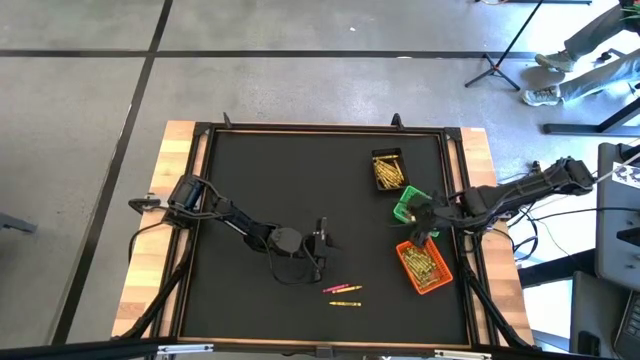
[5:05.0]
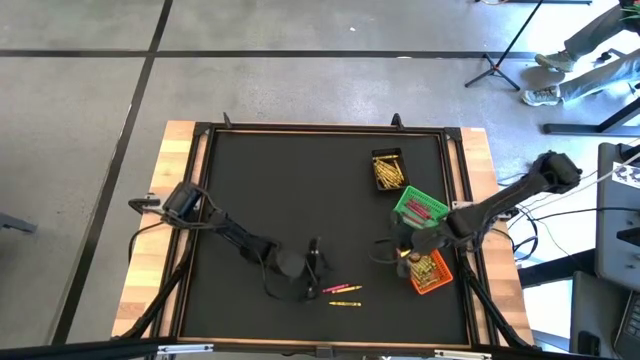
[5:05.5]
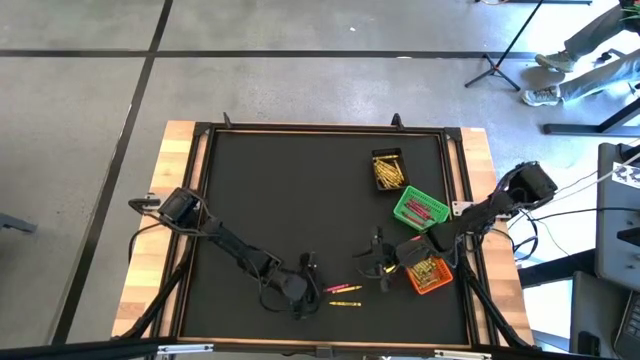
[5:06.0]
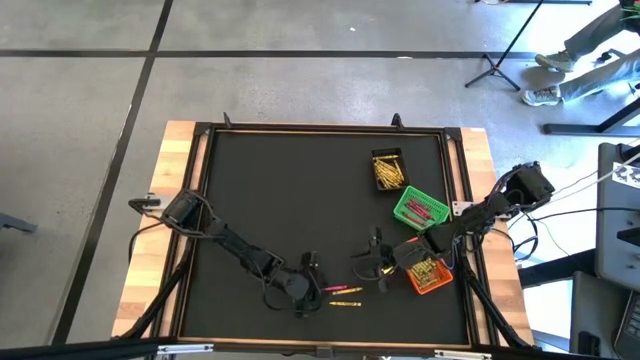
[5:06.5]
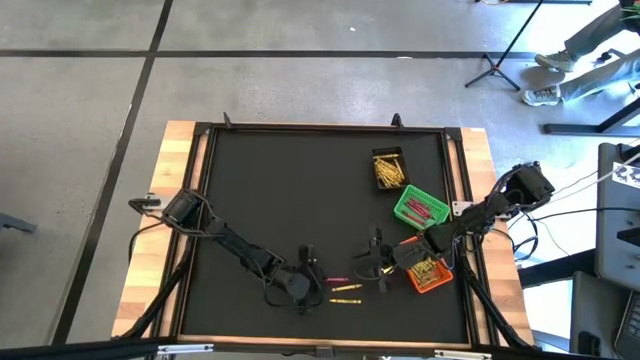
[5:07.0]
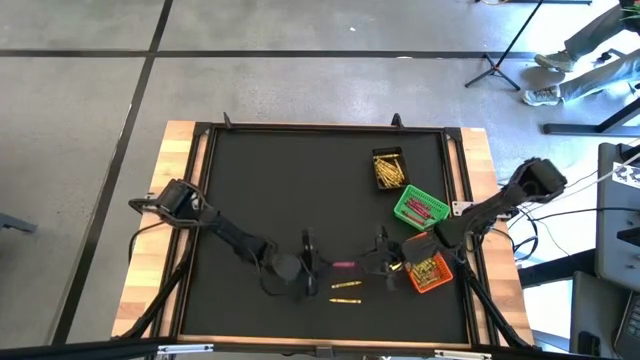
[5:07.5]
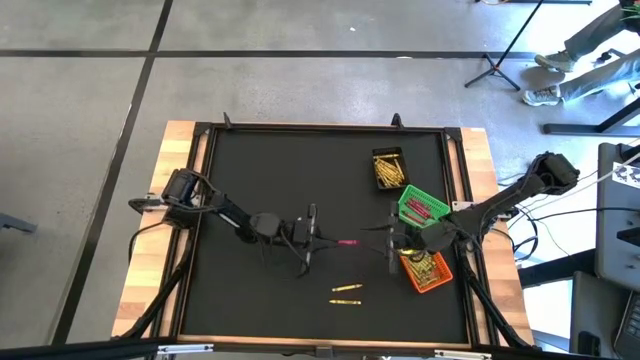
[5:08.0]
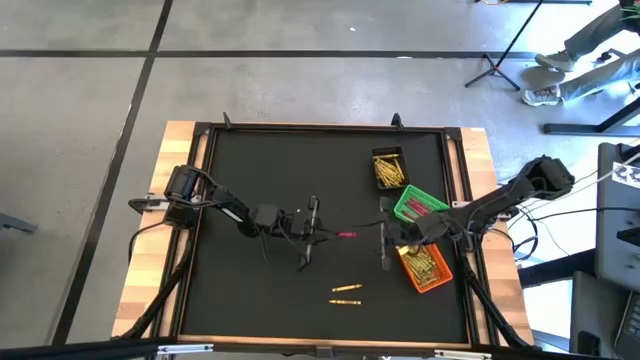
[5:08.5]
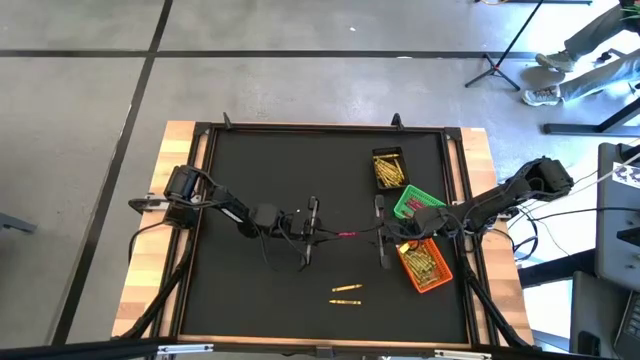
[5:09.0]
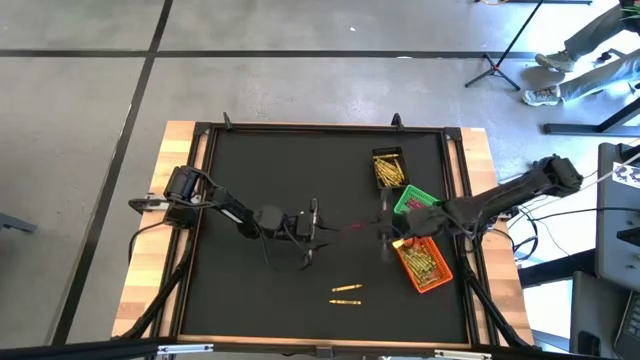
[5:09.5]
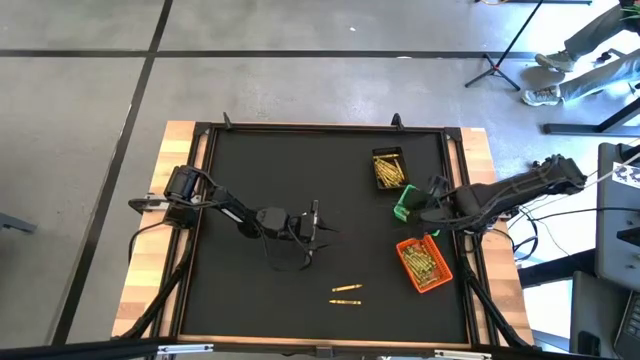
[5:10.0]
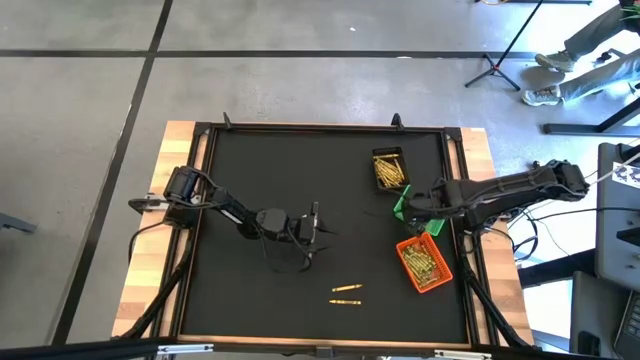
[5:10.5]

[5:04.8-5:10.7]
Task: Sort crayons
Put the red crayon into the green basket

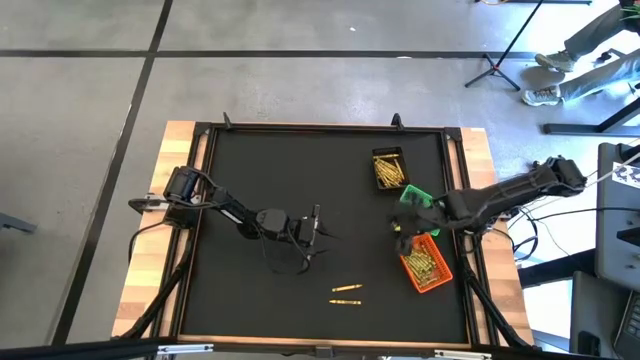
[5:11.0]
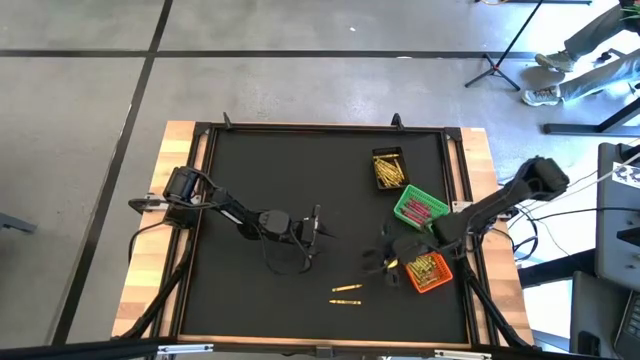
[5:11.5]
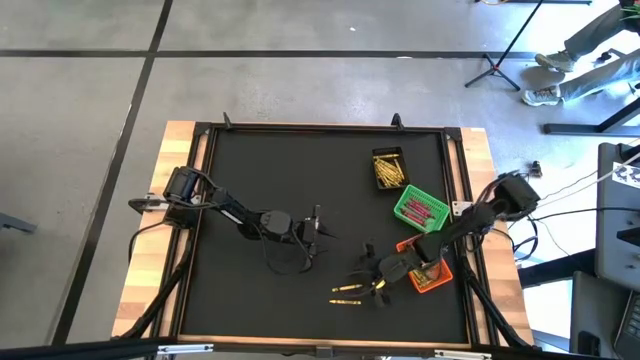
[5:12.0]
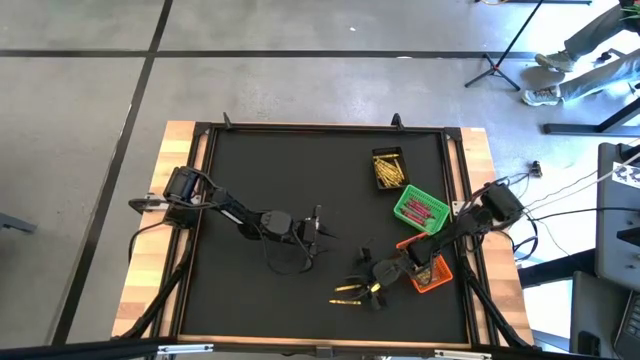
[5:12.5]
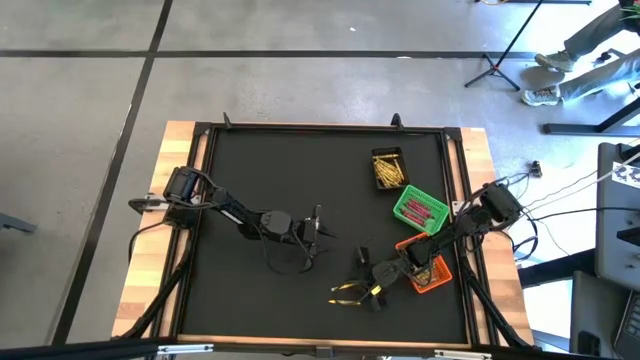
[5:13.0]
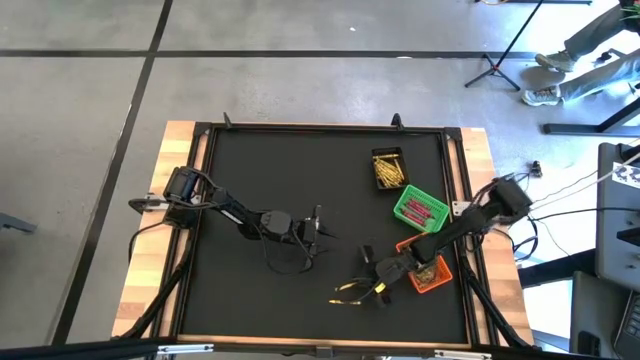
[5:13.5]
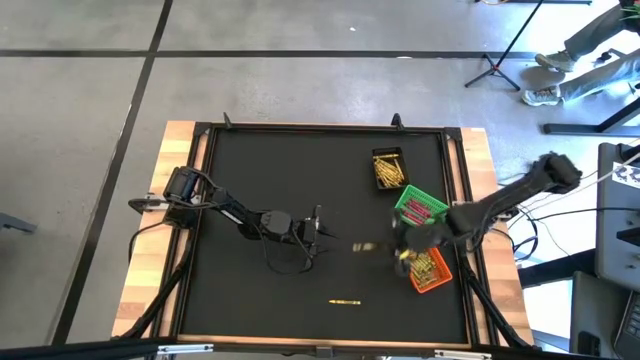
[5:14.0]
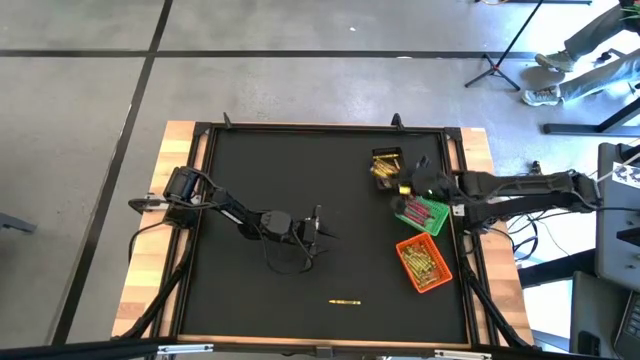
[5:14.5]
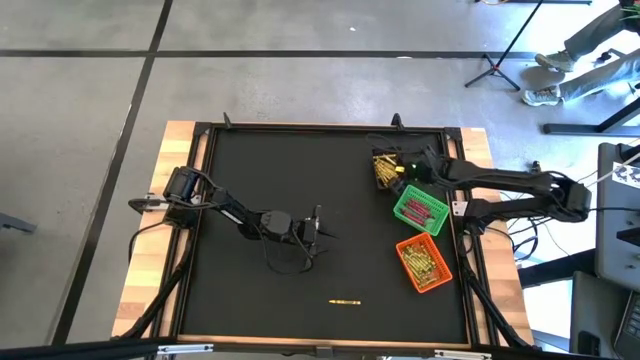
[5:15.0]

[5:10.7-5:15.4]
Put the yellow crayon into the black basket

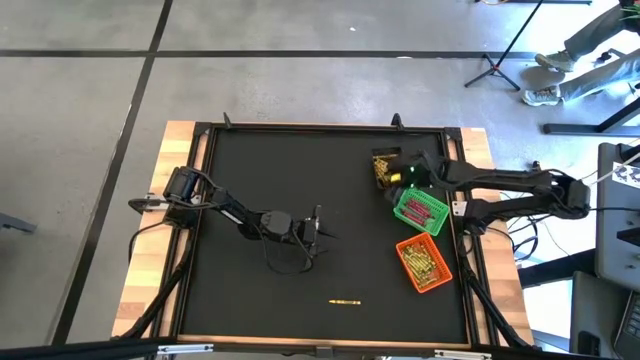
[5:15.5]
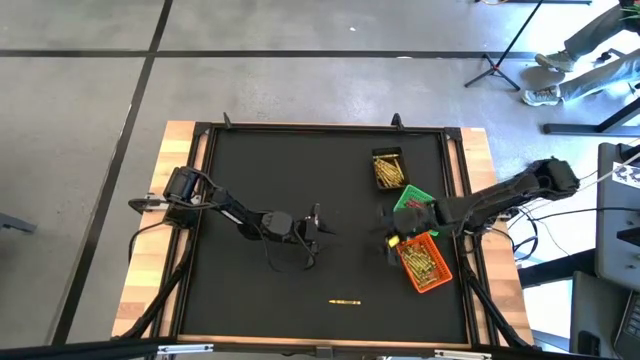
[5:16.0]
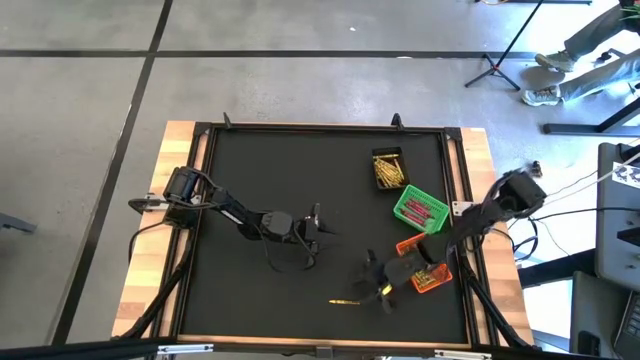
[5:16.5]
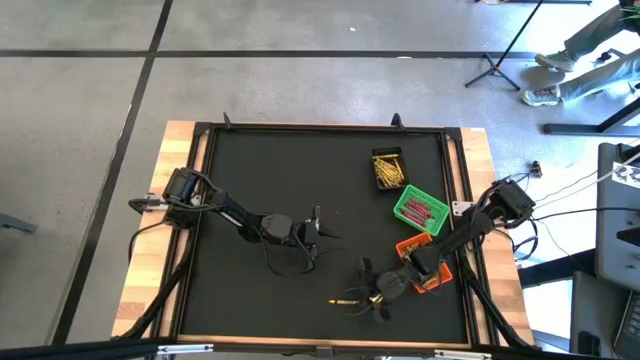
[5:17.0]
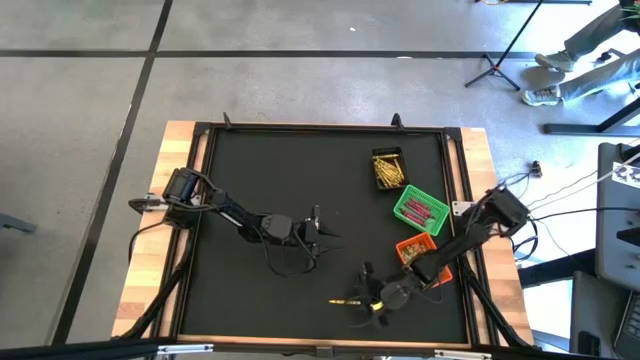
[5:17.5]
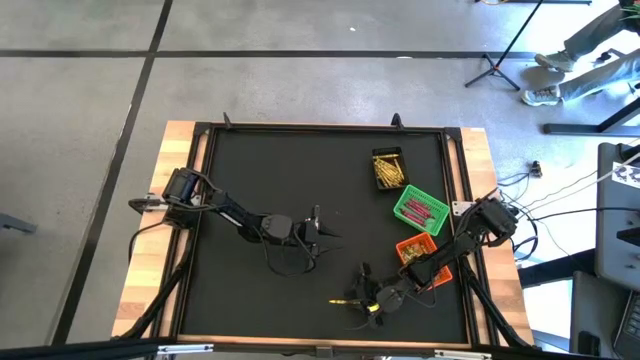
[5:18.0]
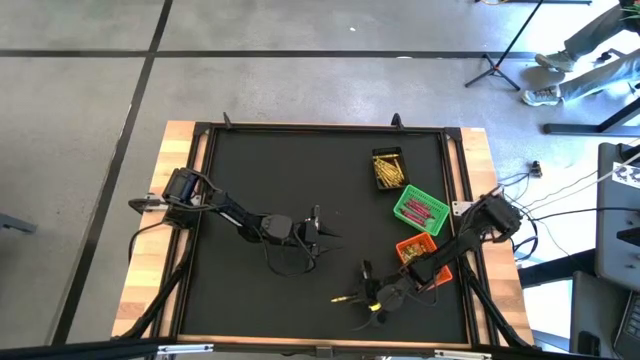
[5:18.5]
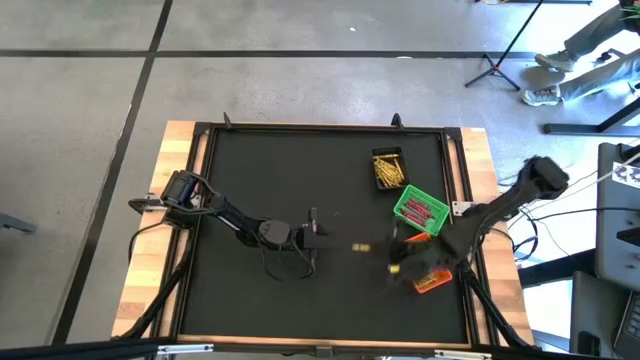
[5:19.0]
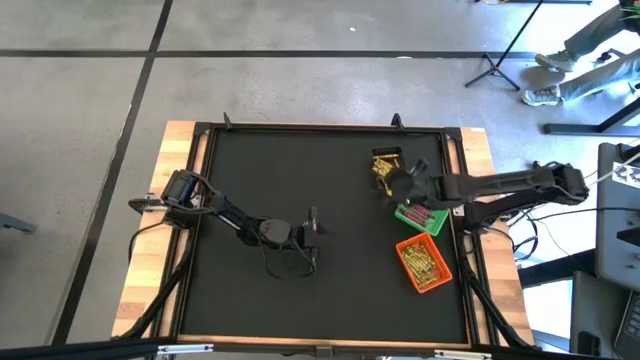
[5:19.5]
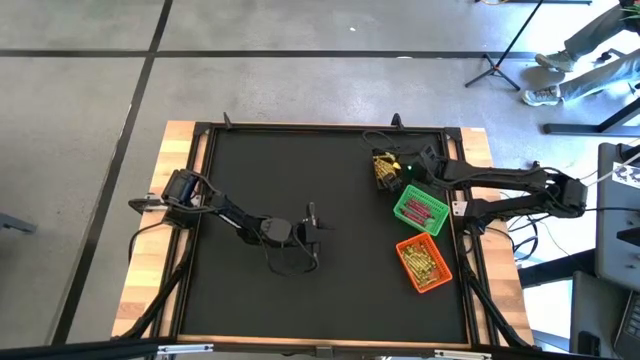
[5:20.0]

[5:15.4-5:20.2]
Put the yellow crayon into the black basket

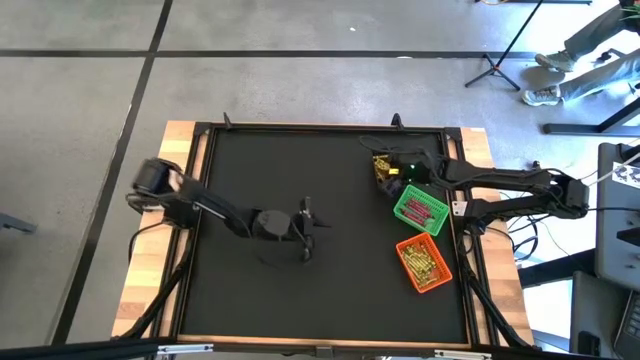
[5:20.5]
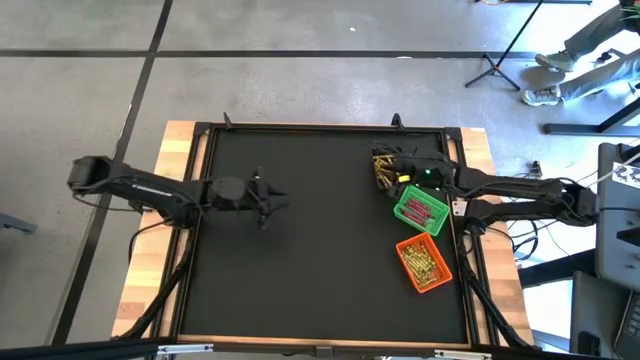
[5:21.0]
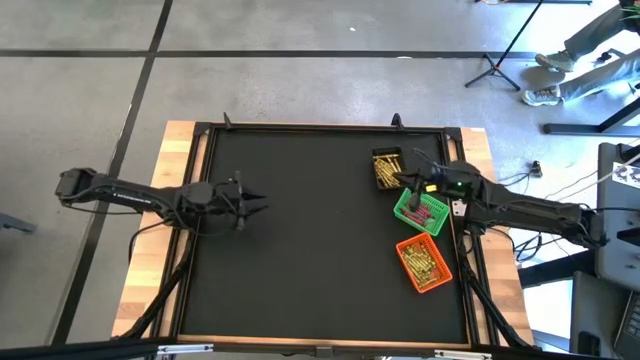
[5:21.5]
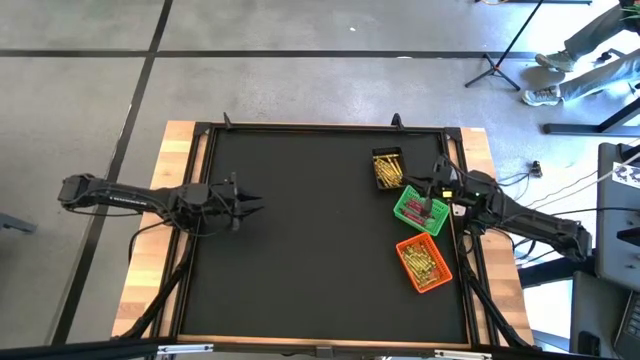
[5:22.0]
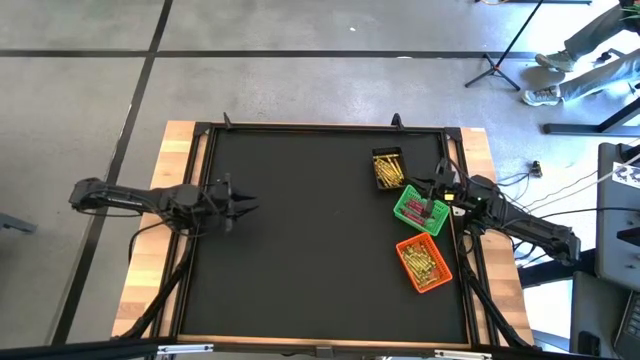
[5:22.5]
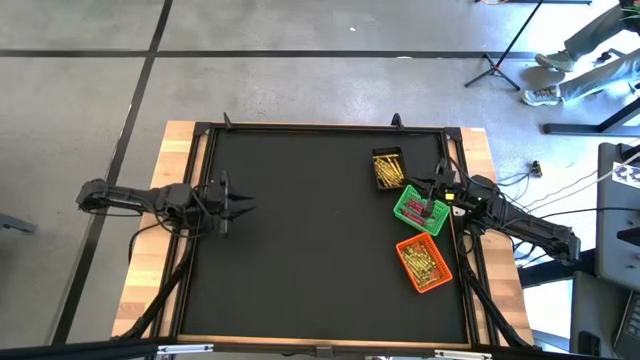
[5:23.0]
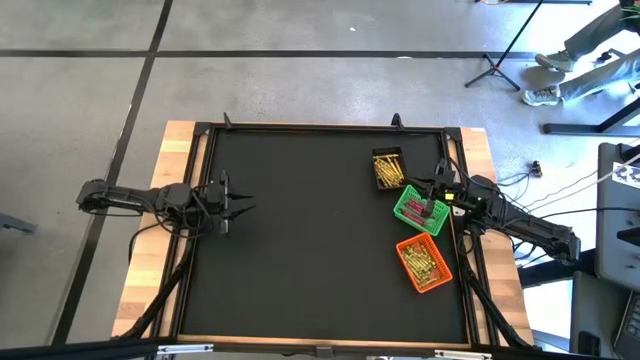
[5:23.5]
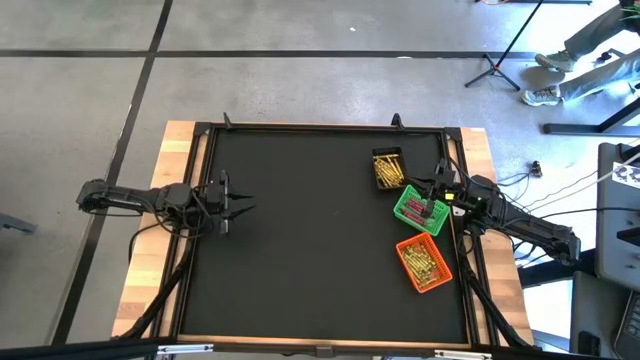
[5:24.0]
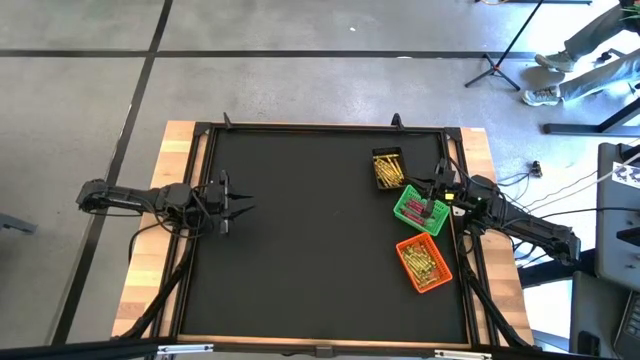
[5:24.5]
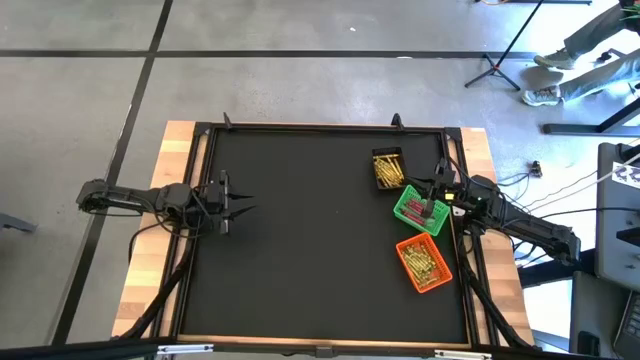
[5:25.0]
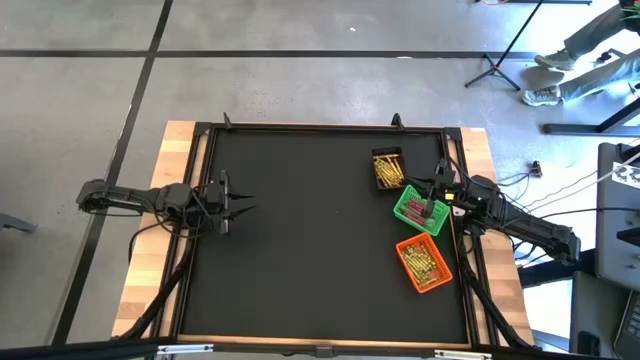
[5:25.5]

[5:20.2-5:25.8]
Return to Home Position
